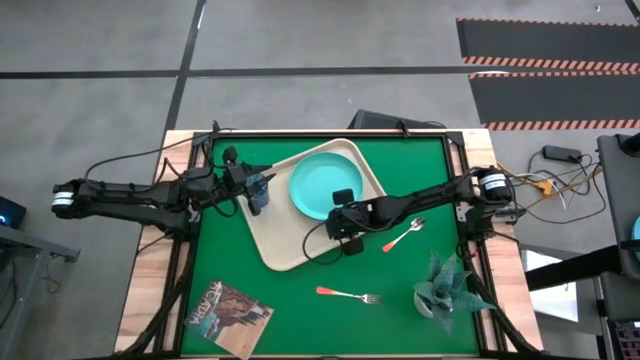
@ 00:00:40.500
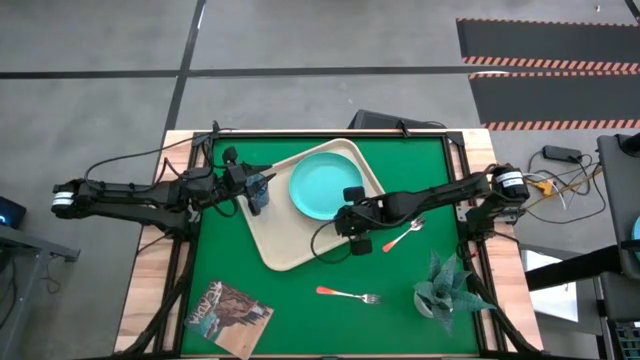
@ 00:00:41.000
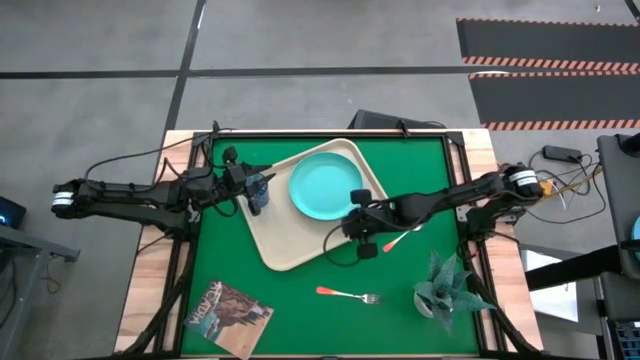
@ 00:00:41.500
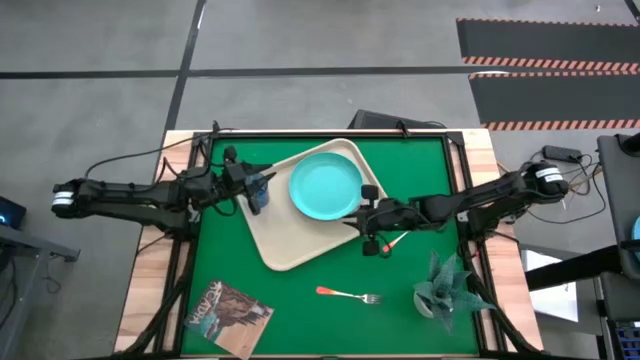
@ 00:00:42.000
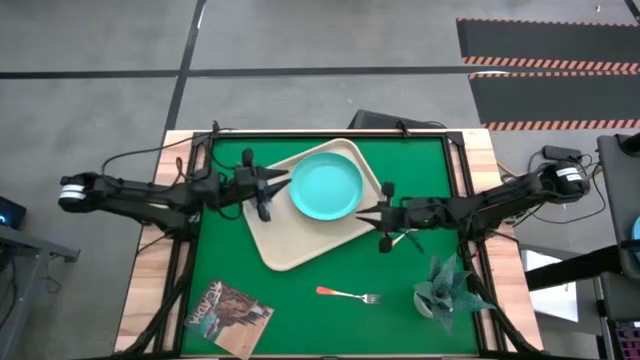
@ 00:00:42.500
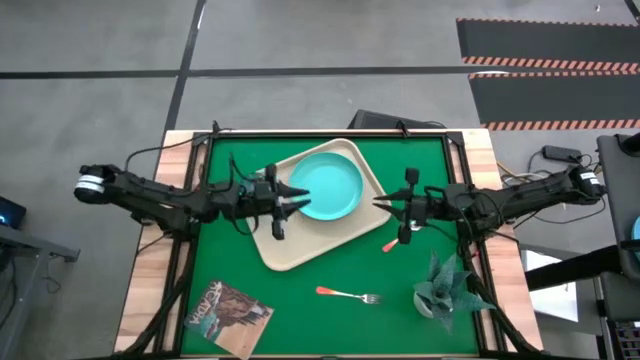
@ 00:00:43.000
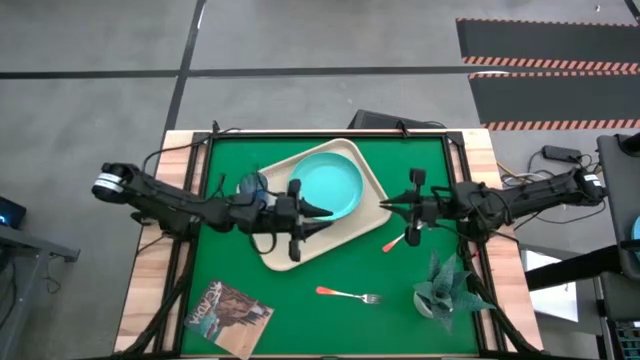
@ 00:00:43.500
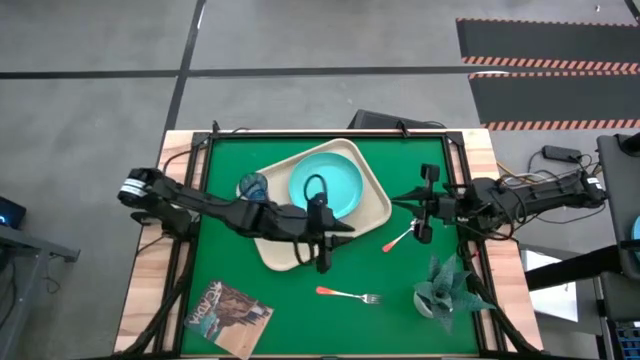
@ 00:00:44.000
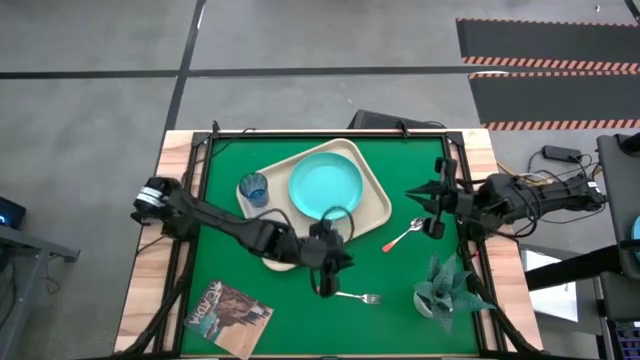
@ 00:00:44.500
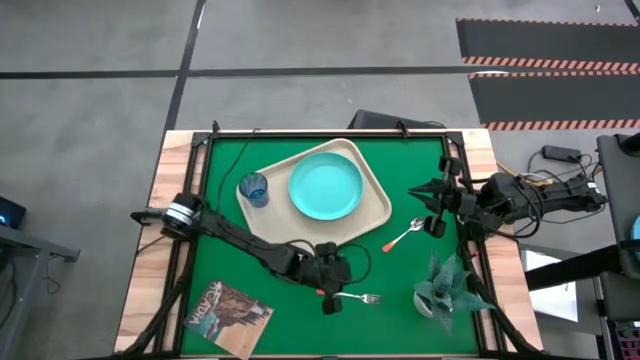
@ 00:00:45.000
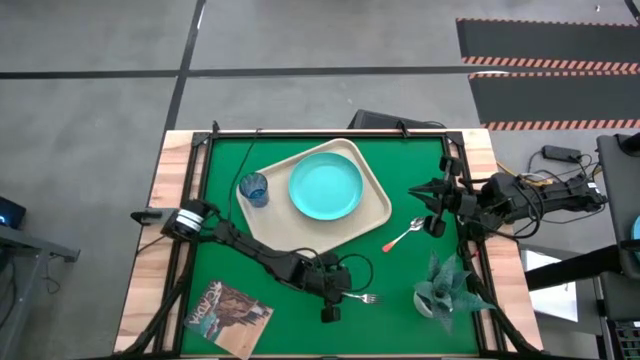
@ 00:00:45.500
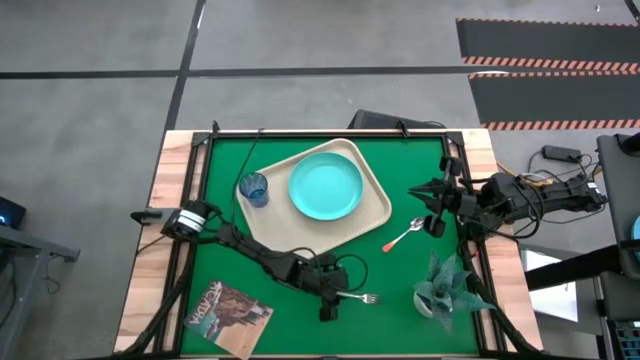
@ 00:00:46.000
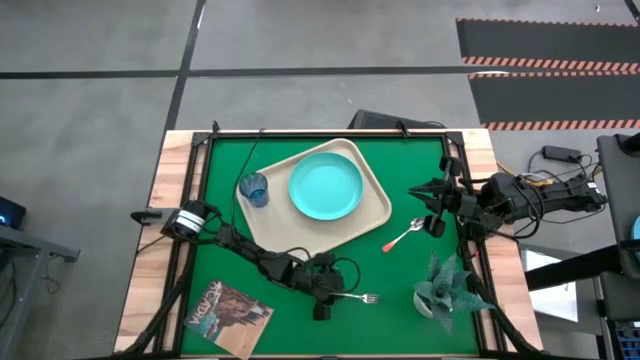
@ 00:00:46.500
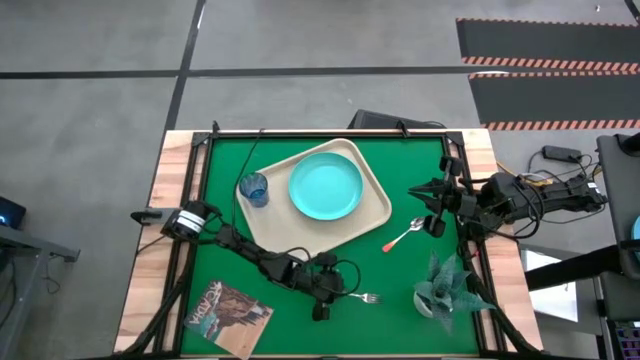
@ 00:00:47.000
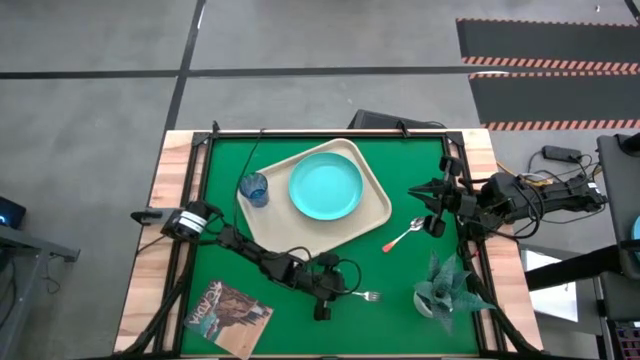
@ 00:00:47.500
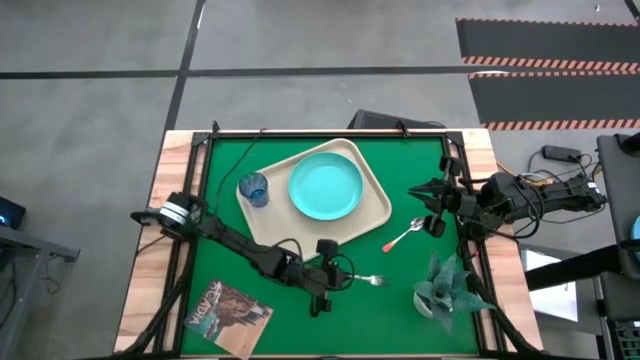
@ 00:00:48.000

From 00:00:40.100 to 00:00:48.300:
Task: Pick and place plate/cup/fork/spoon on tray
Put the orange fork on the white tray

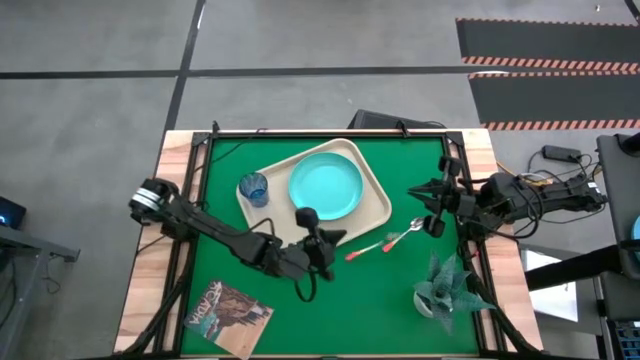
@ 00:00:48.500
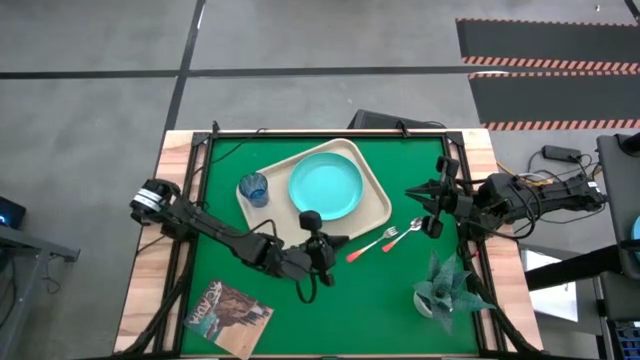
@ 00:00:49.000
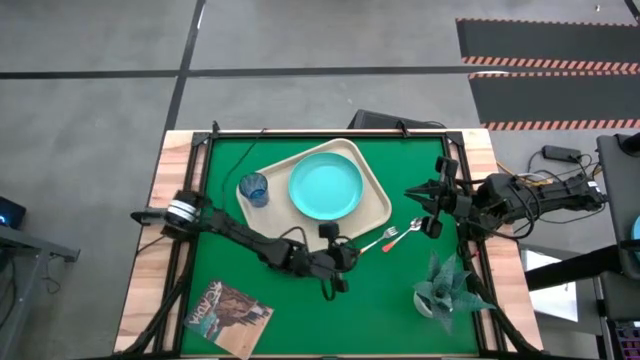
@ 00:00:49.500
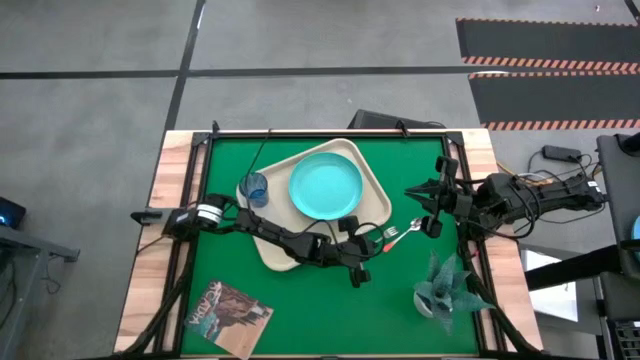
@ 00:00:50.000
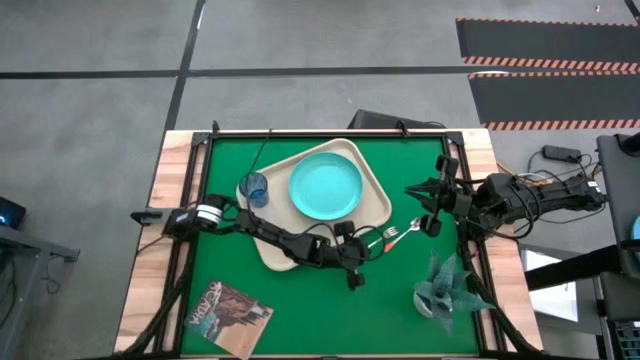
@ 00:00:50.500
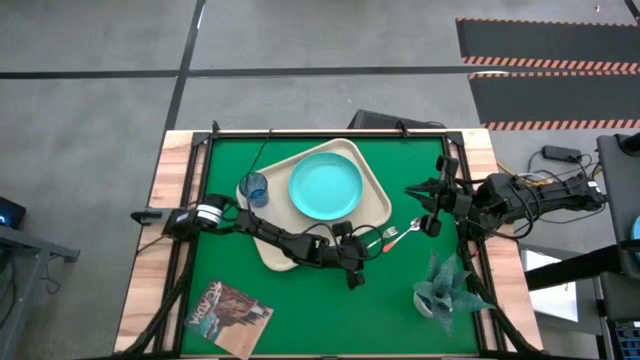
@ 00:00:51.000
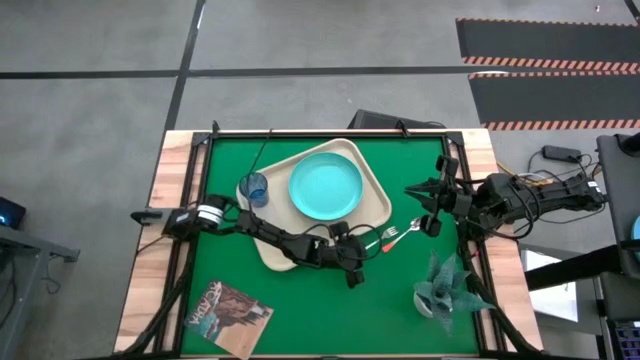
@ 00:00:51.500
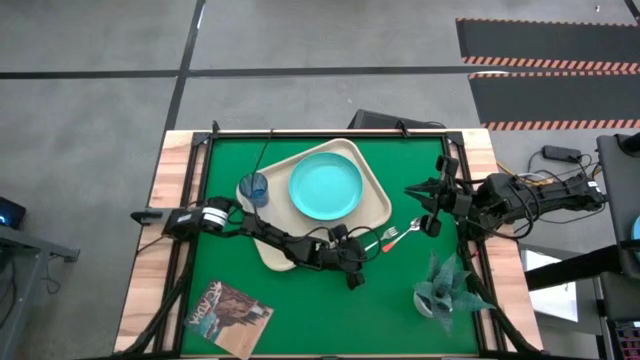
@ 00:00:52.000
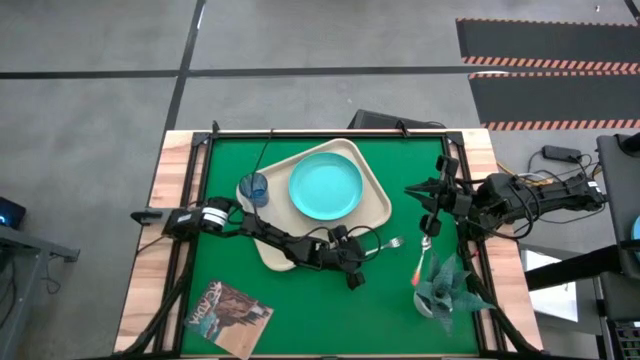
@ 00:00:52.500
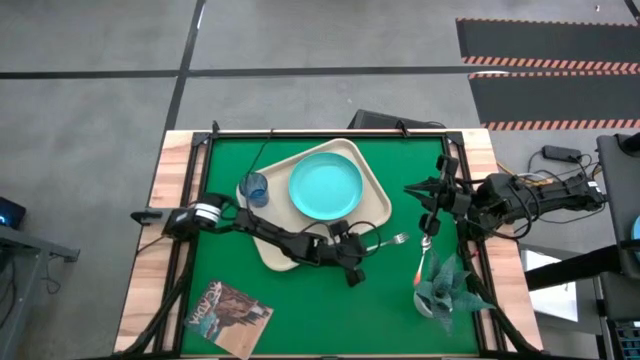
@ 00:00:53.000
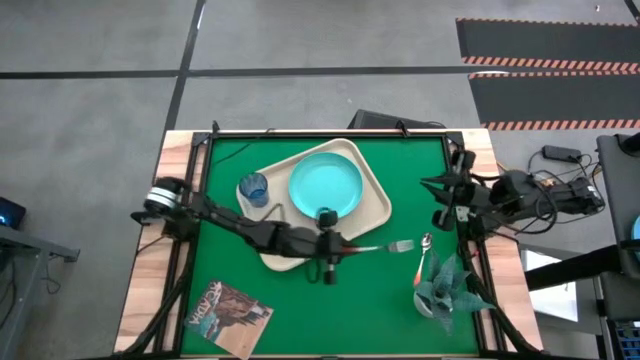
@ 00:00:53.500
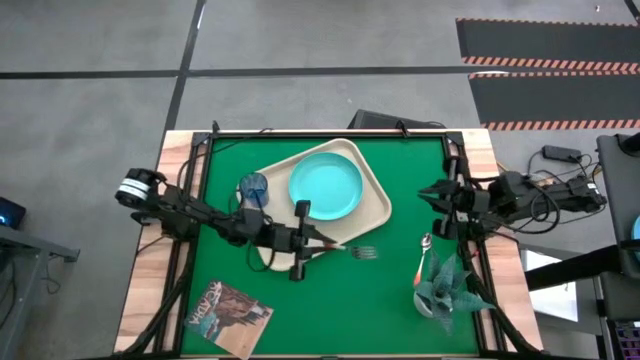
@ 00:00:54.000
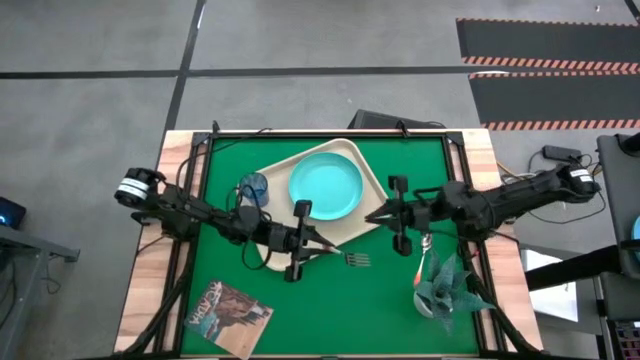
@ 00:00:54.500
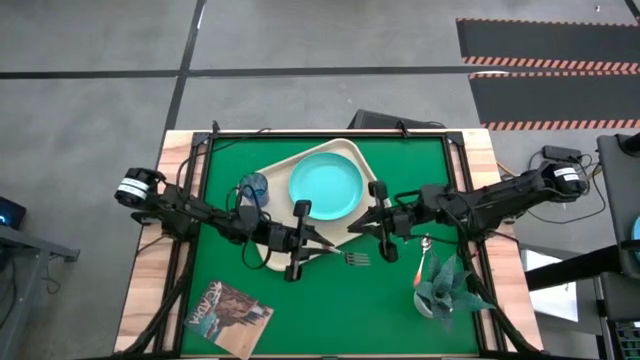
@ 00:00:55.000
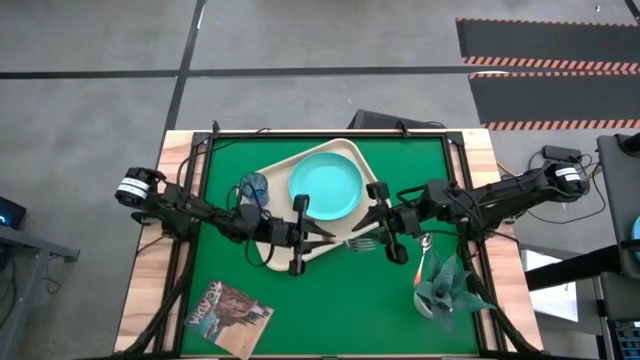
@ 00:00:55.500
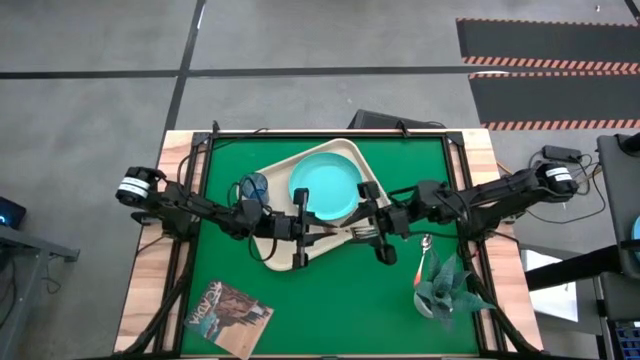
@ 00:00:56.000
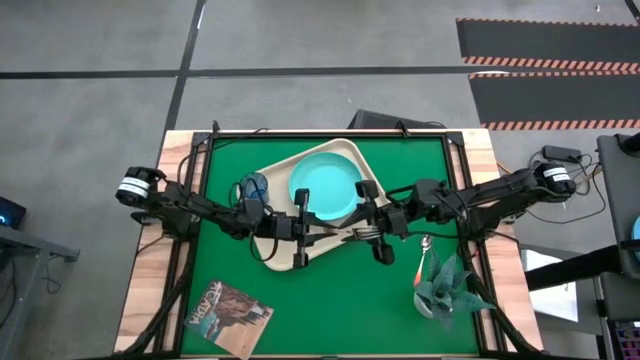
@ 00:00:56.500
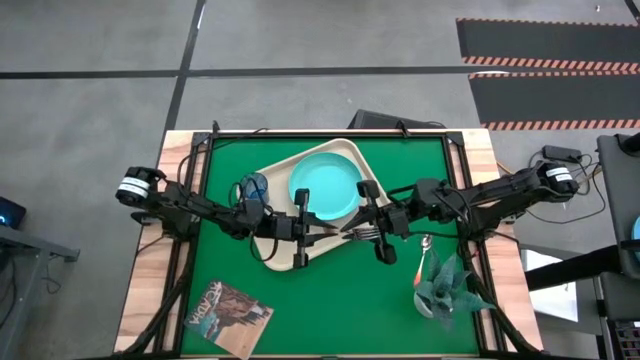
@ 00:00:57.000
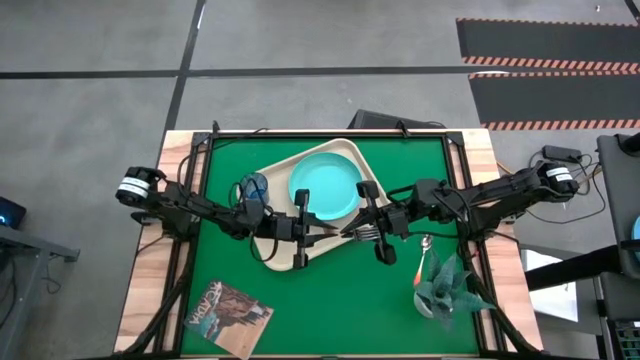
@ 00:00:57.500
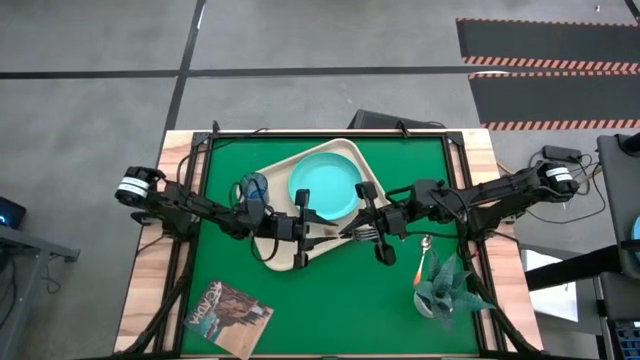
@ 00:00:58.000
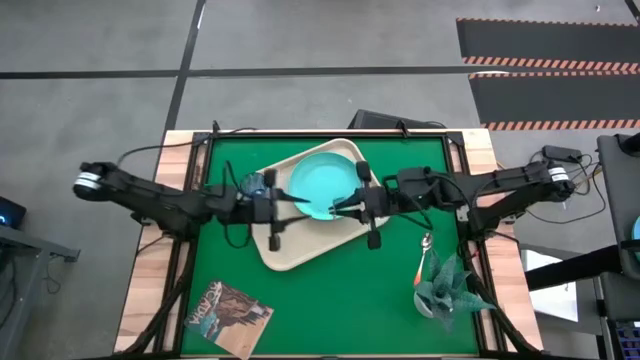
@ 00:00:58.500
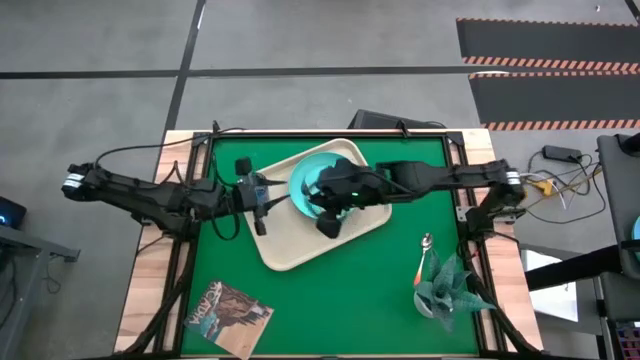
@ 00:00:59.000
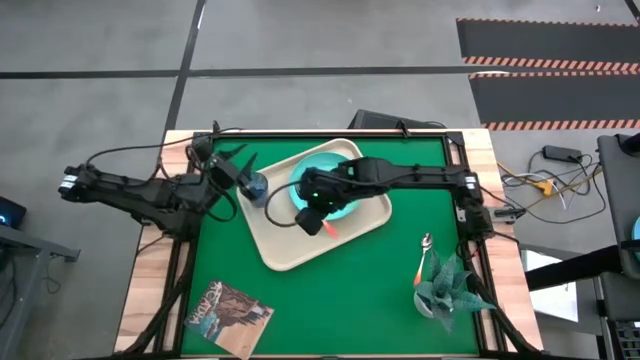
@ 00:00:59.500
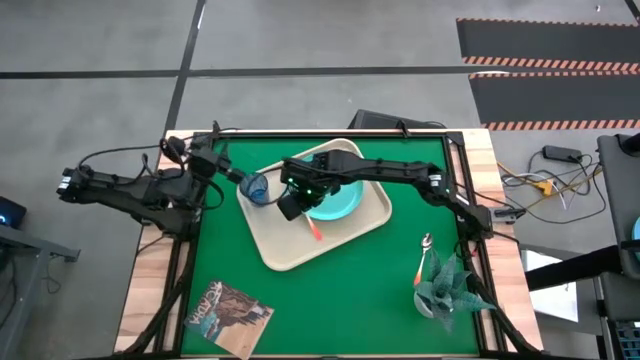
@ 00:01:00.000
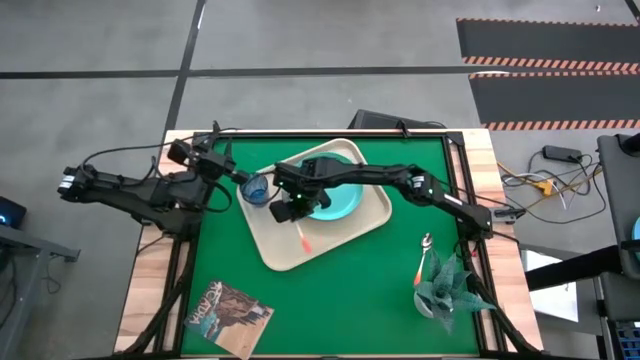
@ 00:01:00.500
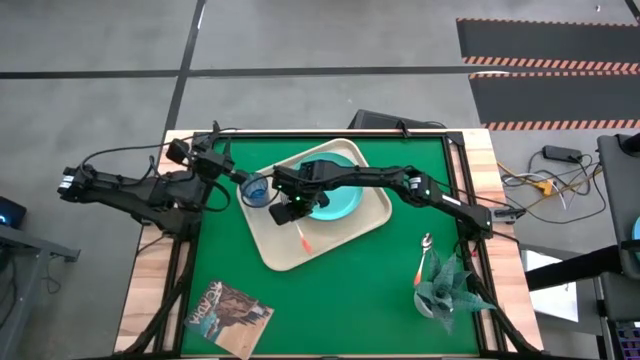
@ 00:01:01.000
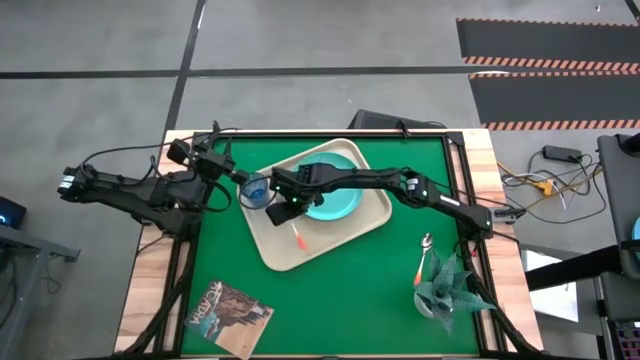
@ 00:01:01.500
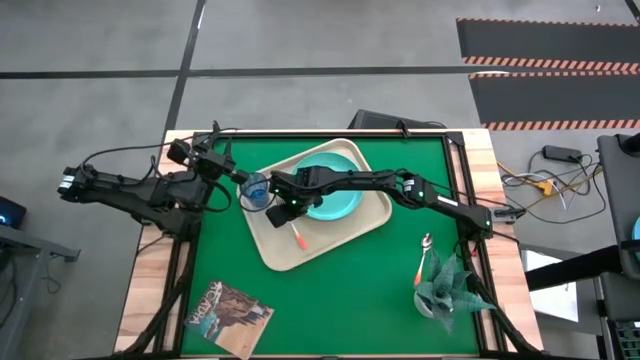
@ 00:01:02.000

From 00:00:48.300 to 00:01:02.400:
Put the orange fork on the white tray to the left of the blue plate
